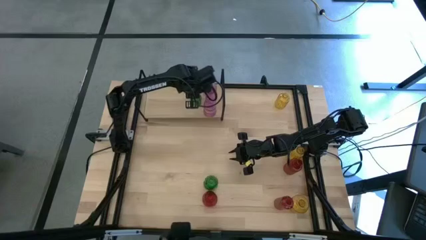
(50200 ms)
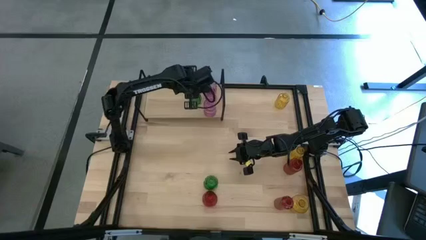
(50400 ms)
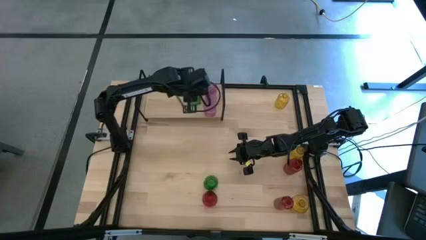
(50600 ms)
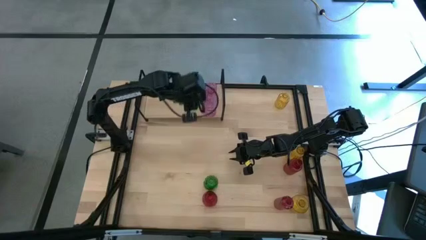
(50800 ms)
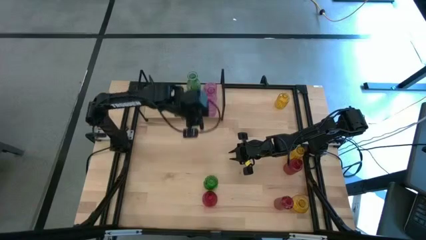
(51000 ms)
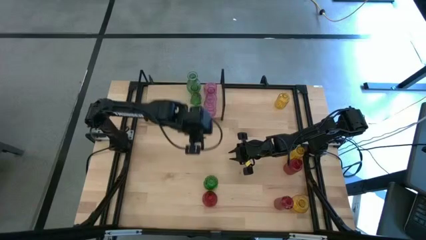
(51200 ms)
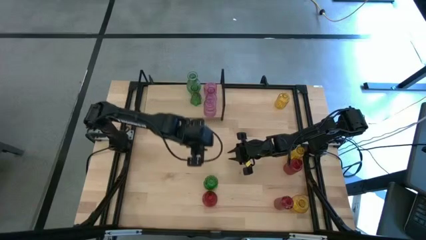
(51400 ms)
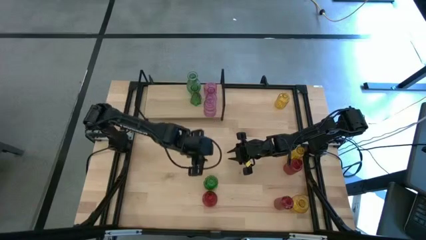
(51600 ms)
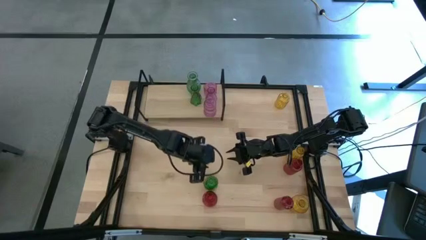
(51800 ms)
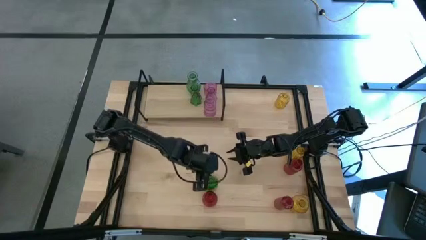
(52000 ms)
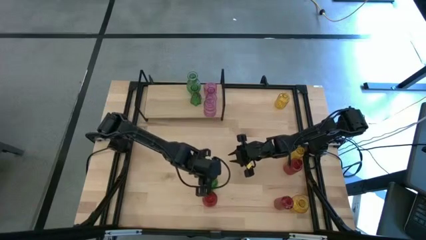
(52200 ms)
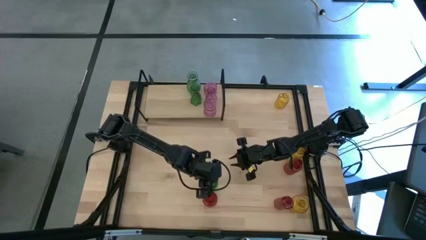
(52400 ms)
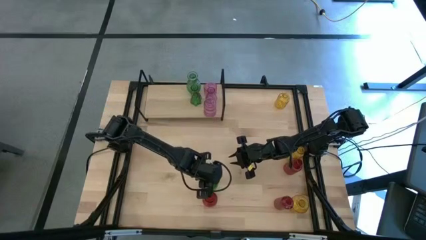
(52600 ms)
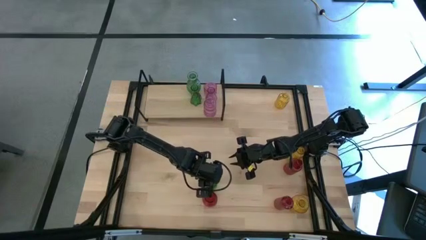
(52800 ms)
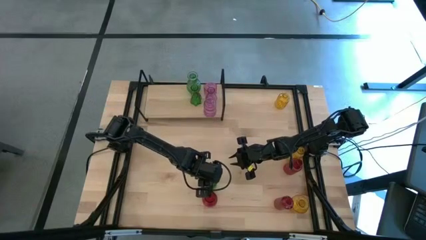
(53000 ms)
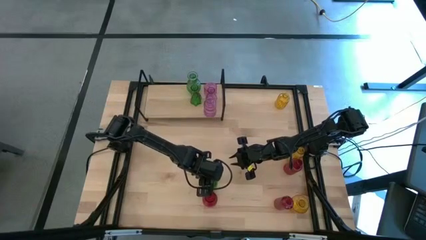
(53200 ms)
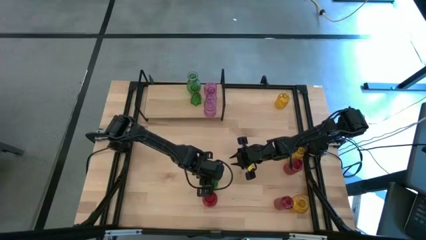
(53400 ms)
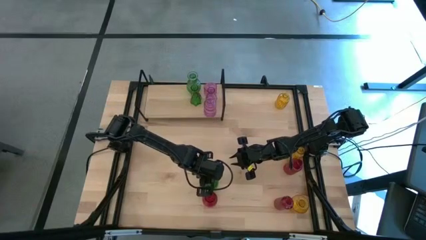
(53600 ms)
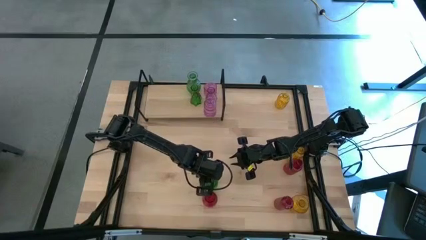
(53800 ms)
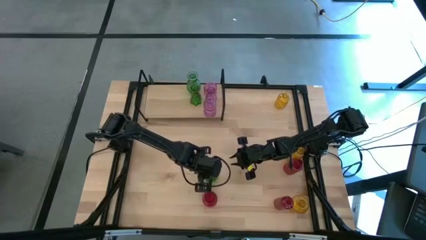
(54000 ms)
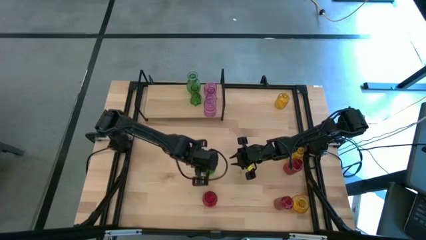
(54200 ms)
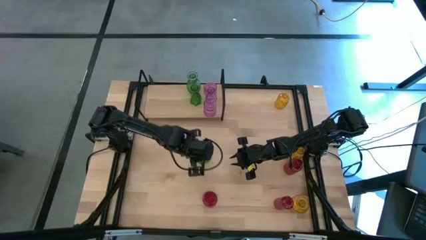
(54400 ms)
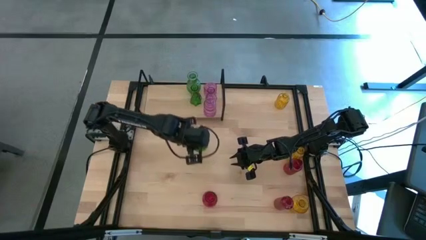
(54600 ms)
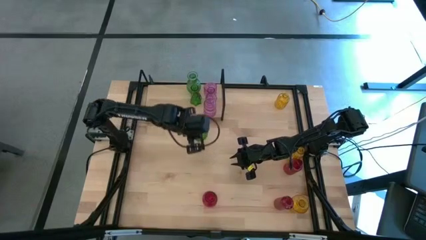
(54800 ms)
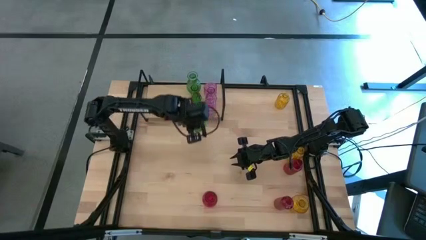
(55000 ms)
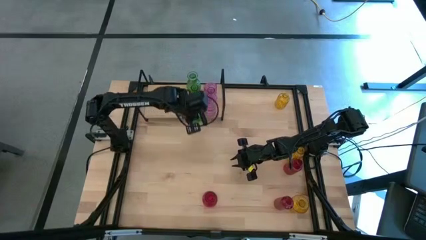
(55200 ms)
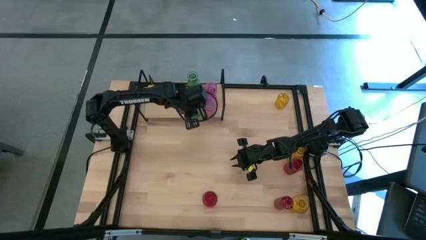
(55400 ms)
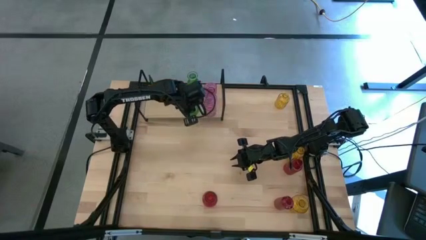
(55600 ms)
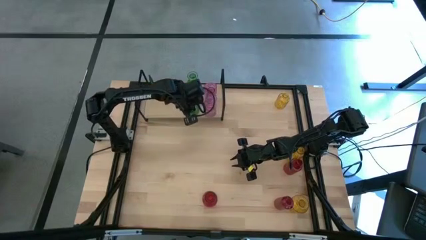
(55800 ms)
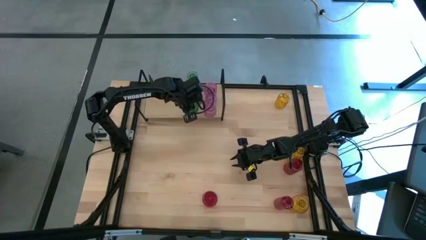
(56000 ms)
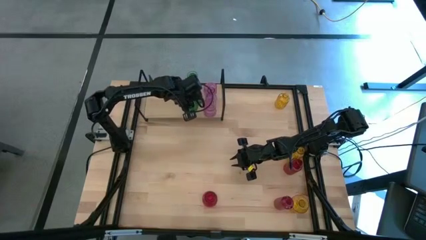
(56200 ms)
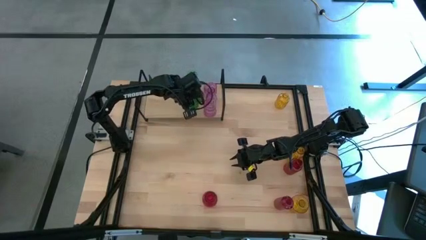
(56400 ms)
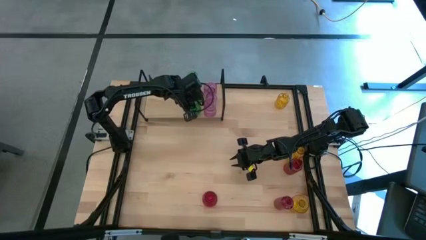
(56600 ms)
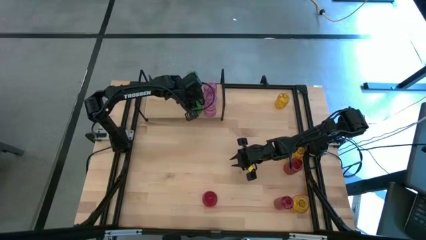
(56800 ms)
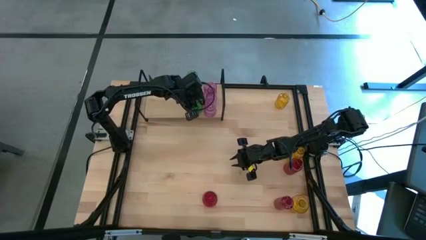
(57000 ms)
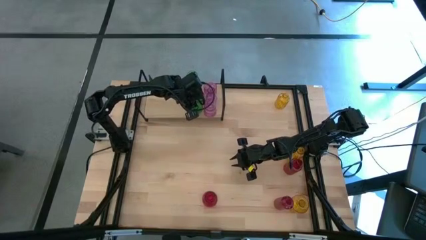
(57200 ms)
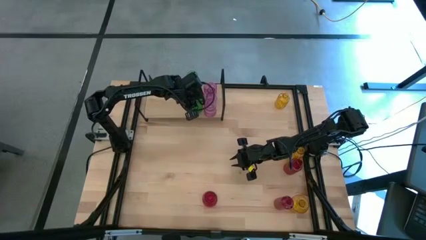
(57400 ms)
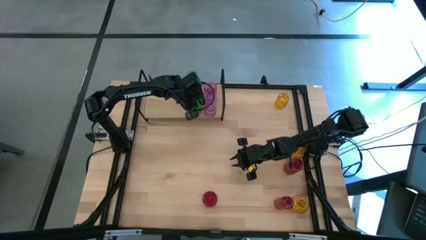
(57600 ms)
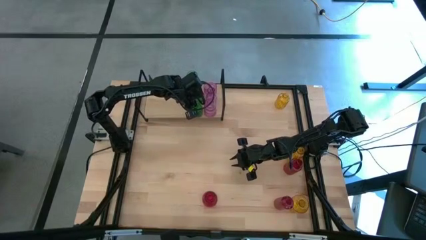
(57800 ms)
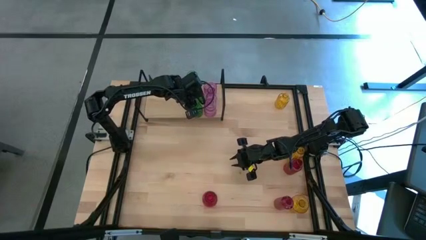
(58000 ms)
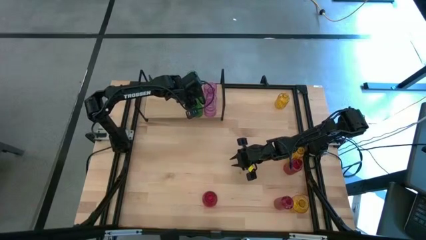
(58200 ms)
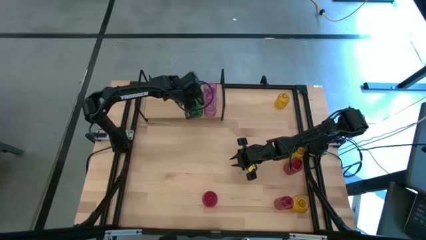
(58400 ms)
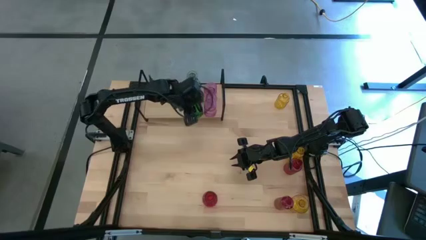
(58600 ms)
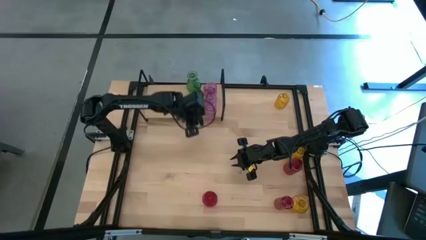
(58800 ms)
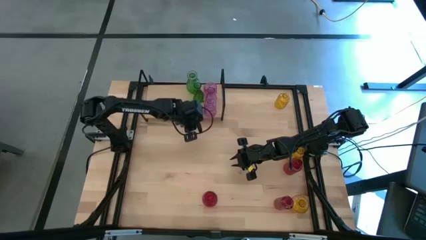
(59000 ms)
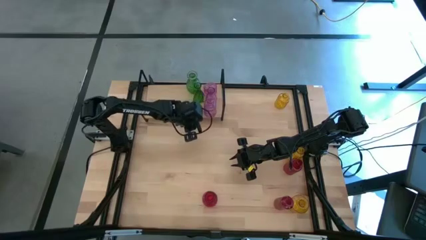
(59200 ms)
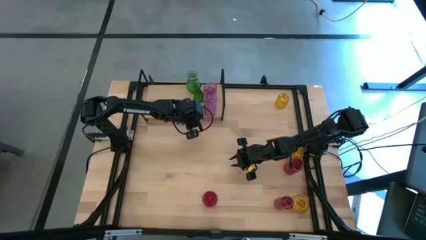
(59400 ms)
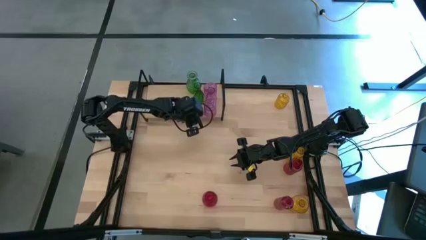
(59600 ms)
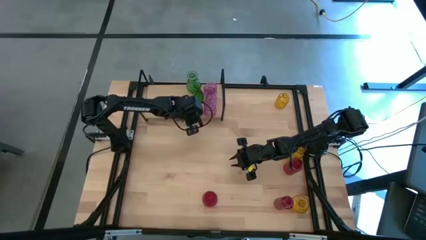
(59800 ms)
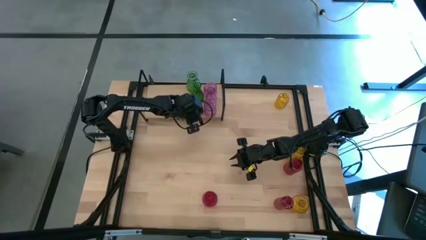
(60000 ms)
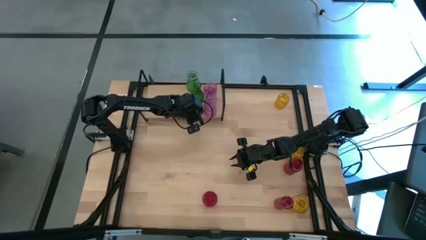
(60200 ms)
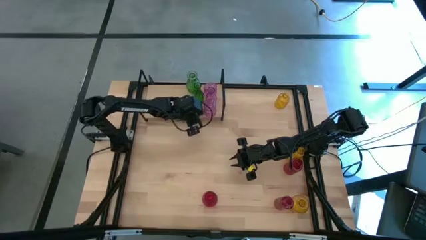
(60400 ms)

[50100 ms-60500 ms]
Task: sort vases onto shelf
Put the green vase on the shelf aligned with the other green vase

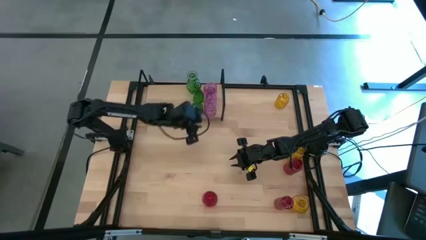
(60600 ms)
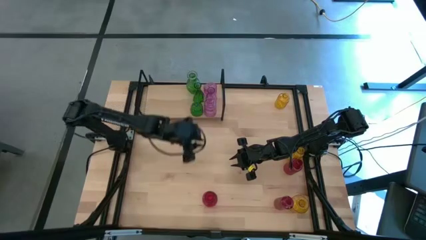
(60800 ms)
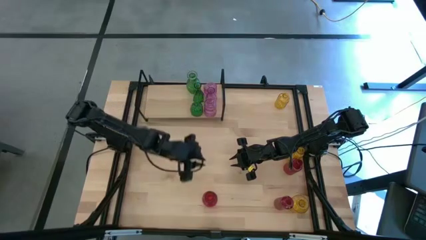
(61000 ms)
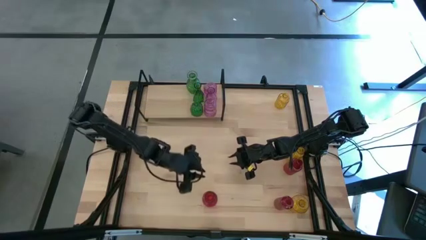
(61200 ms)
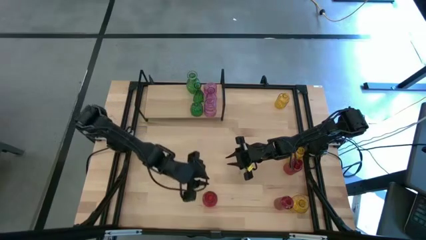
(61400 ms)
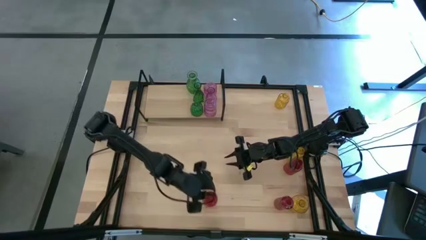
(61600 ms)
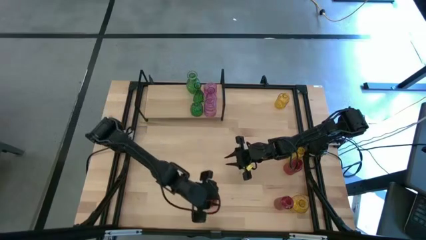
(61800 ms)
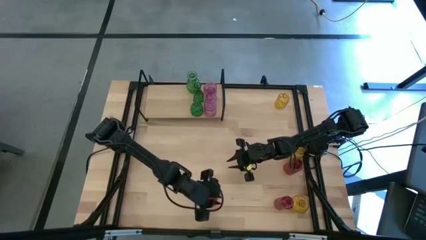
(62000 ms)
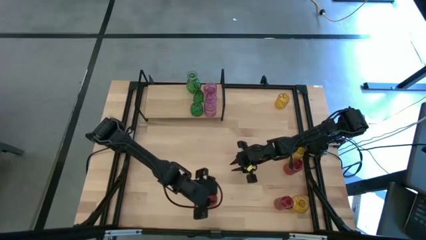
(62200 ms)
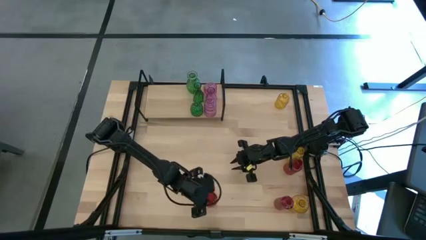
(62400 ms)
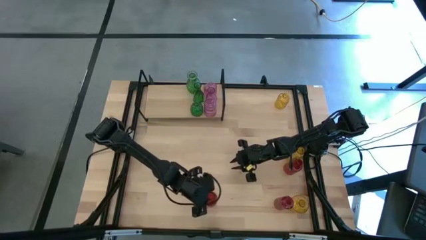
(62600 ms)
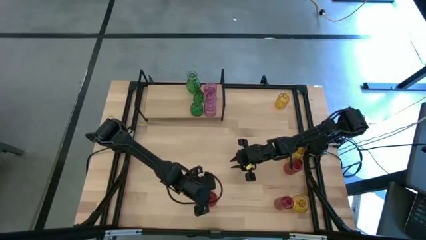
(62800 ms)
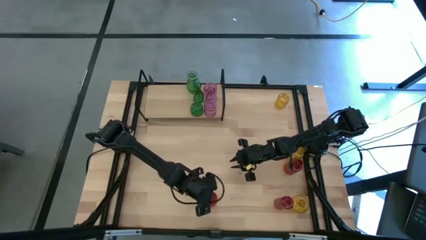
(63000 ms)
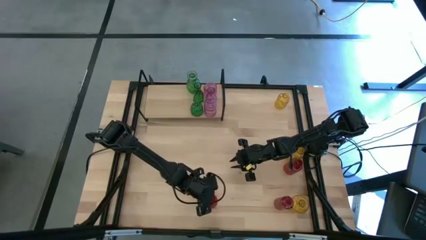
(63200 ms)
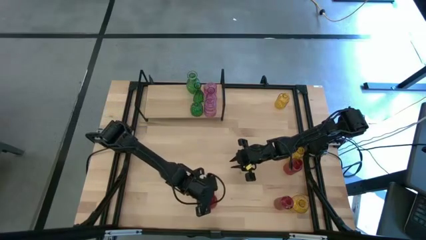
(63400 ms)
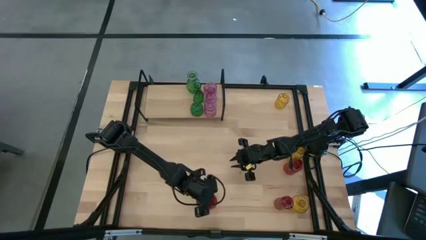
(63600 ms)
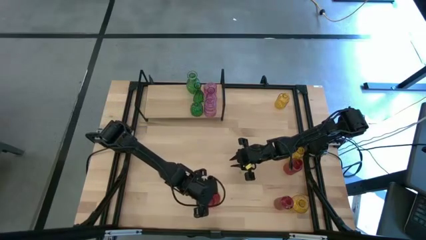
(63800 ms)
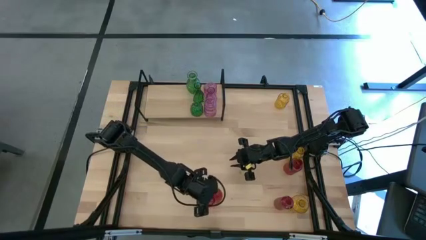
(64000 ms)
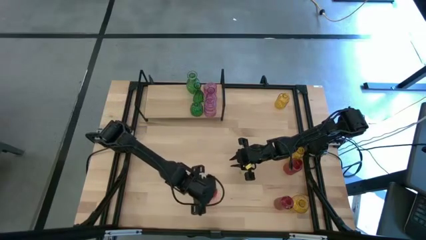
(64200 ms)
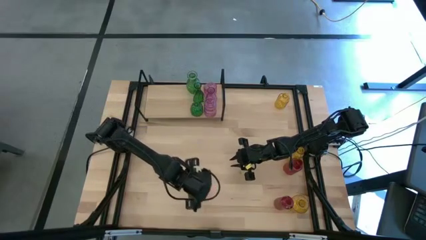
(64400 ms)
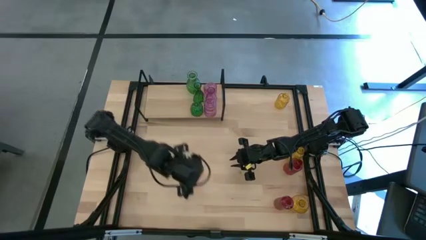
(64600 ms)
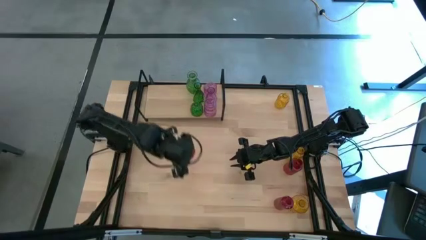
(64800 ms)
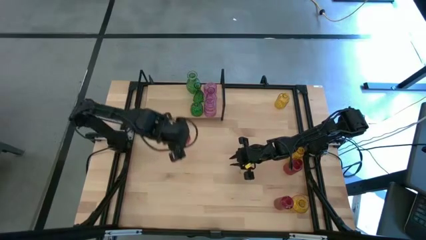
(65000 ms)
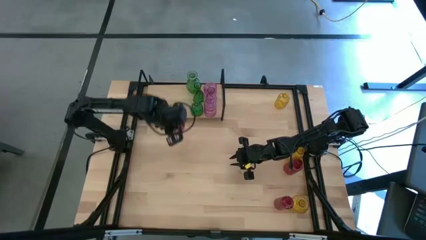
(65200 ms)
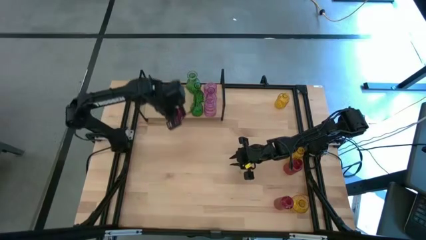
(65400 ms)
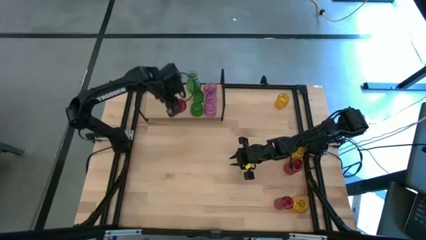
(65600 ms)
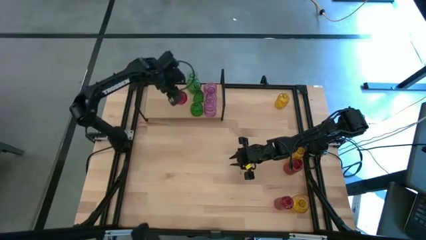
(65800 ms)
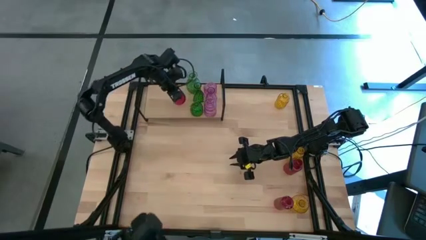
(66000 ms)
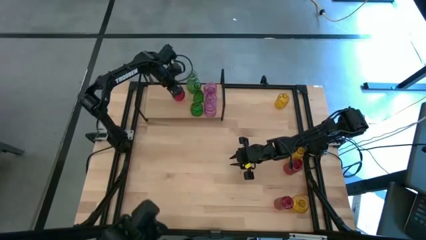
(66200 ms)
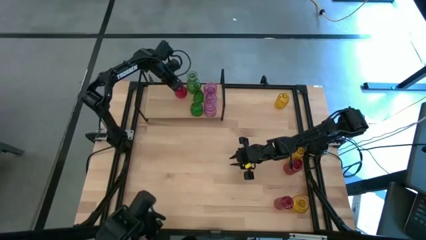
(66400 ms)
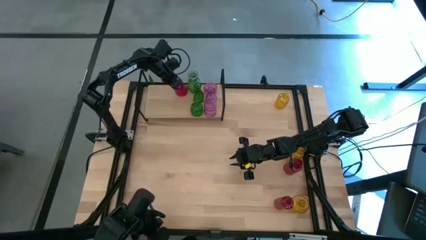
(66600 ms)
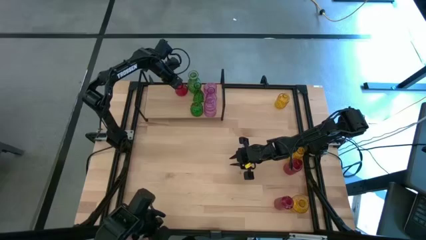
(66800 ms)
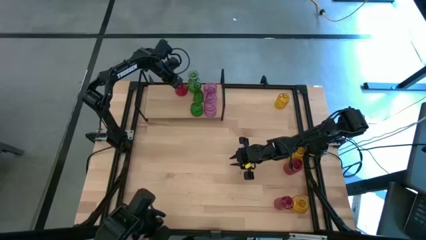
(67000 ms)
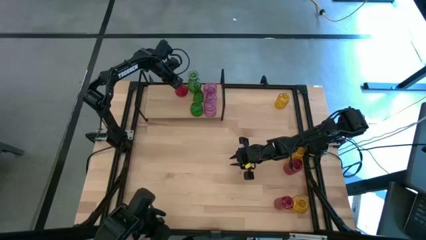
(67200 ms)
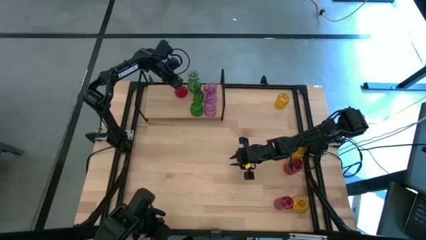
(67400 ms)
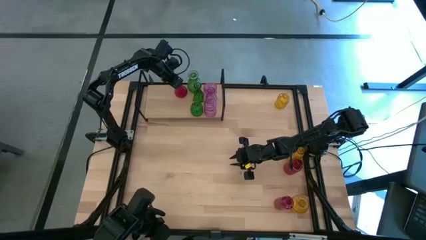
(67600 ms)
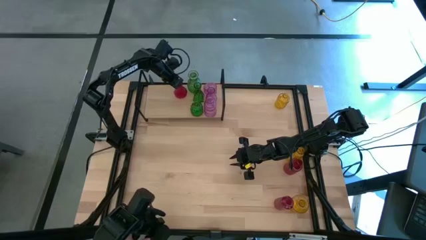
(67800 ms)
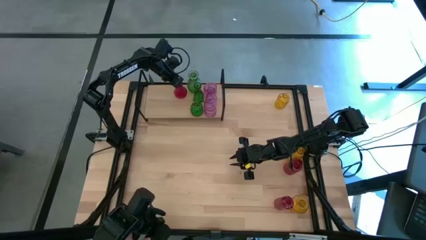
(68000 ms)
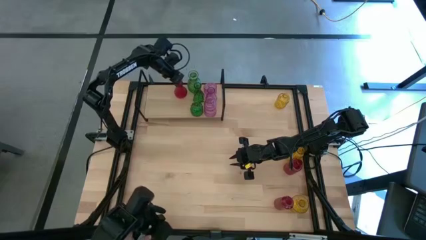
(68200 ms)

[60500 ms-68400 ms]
Put the bottom left red vase on the shelf
